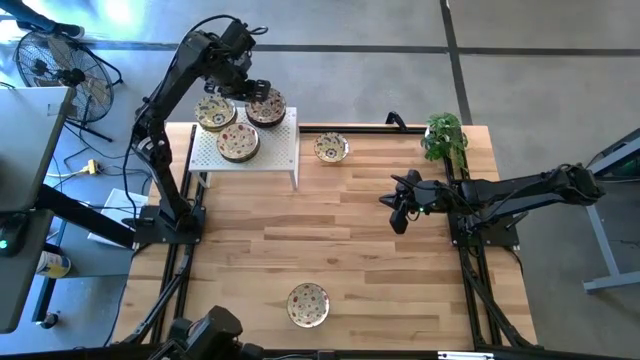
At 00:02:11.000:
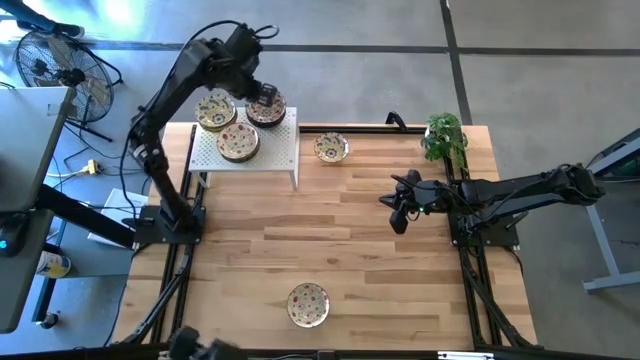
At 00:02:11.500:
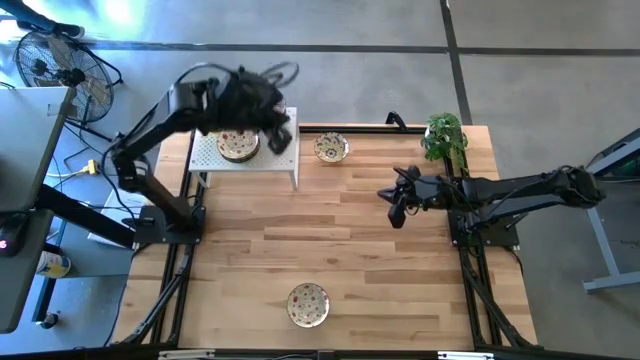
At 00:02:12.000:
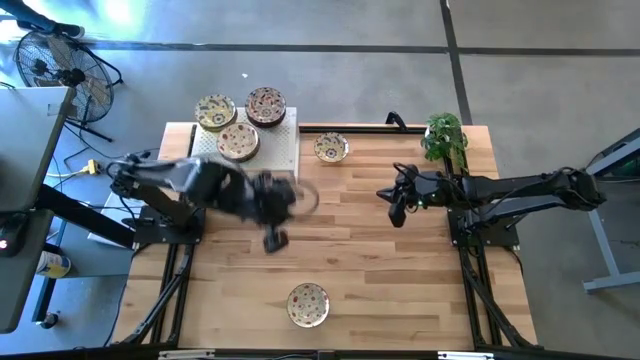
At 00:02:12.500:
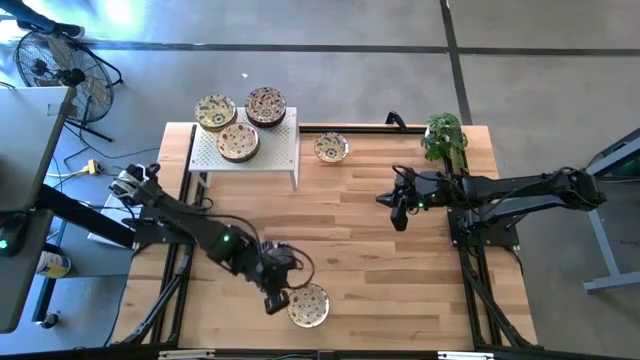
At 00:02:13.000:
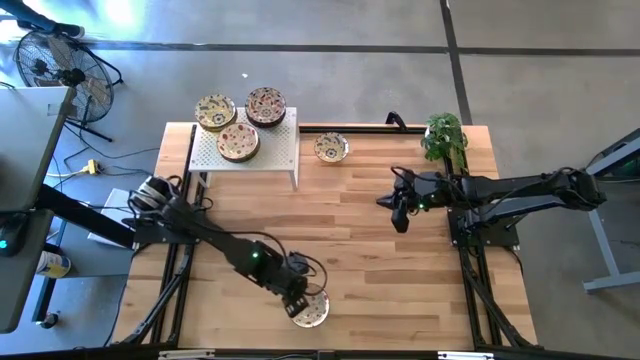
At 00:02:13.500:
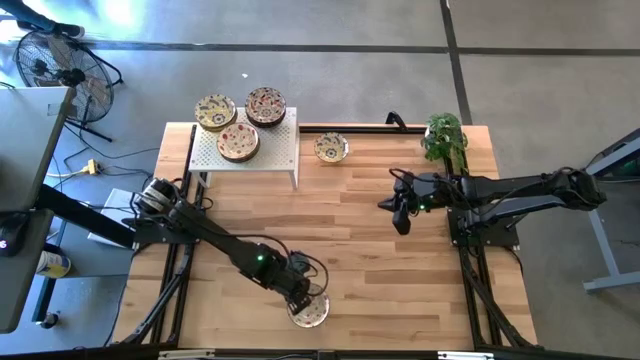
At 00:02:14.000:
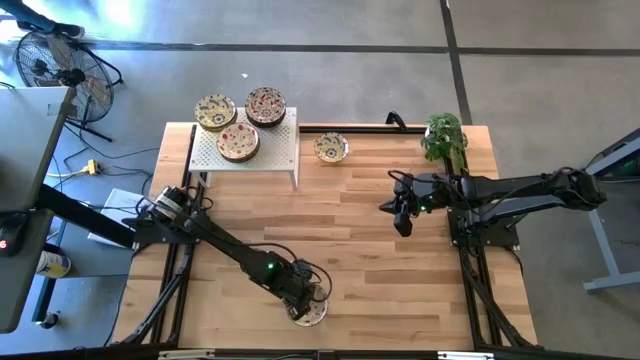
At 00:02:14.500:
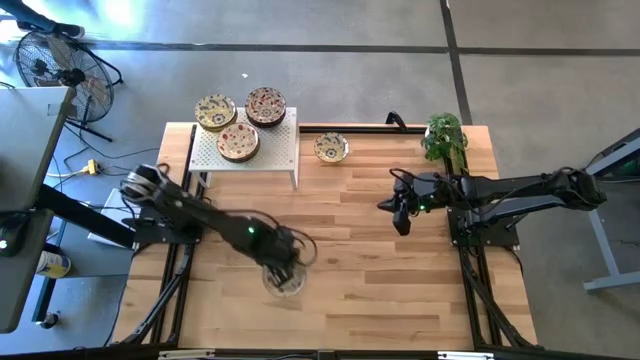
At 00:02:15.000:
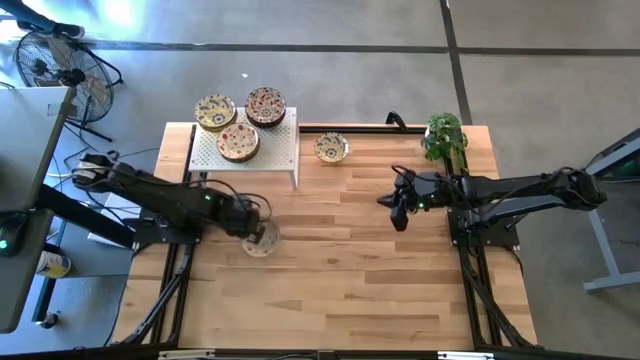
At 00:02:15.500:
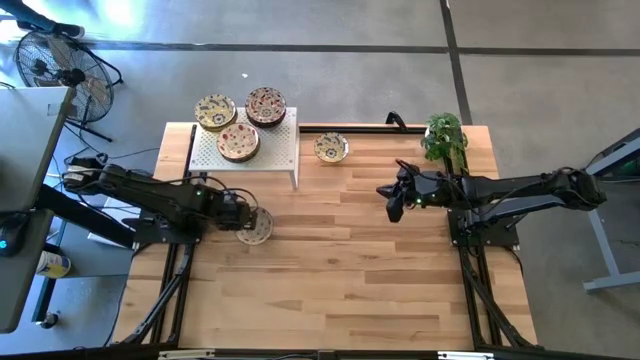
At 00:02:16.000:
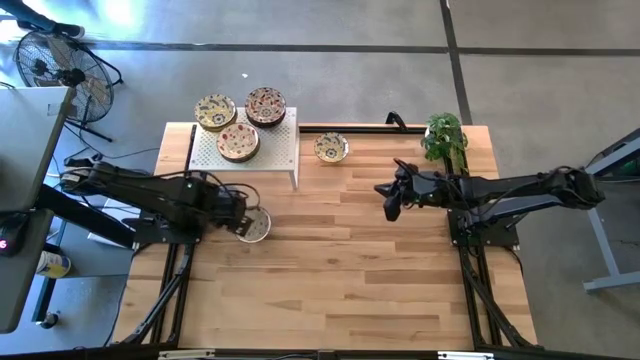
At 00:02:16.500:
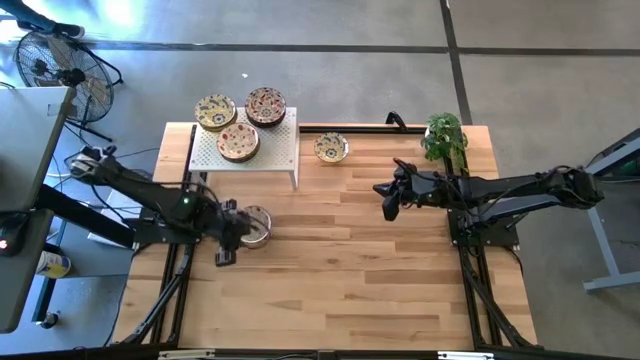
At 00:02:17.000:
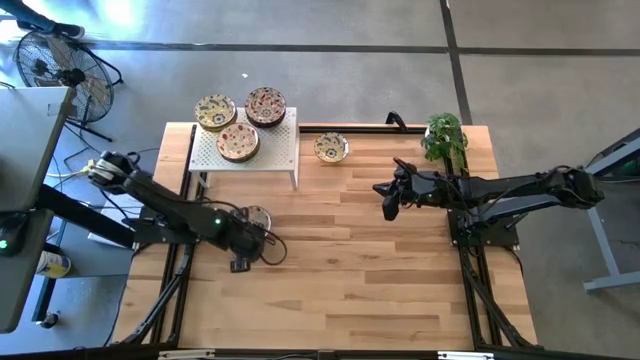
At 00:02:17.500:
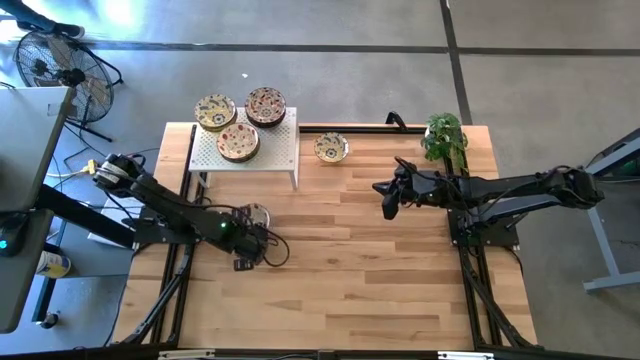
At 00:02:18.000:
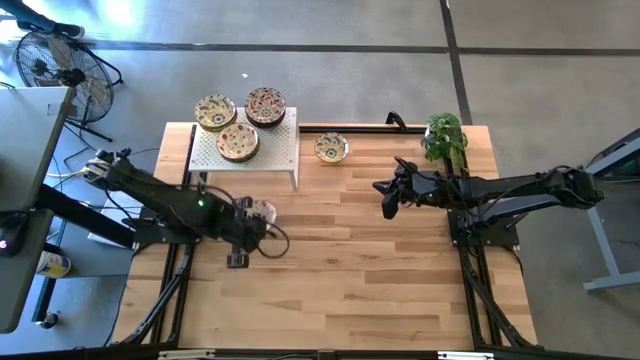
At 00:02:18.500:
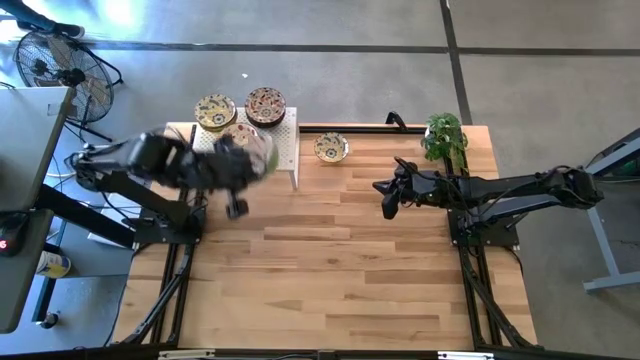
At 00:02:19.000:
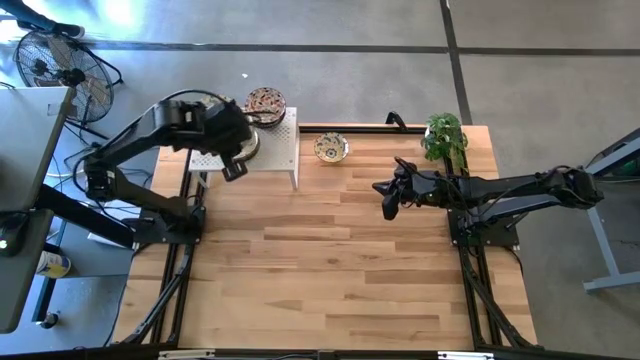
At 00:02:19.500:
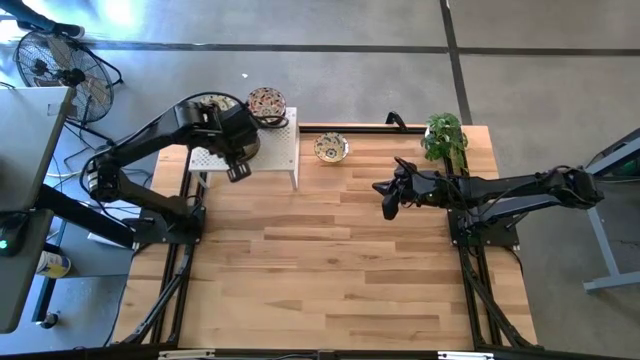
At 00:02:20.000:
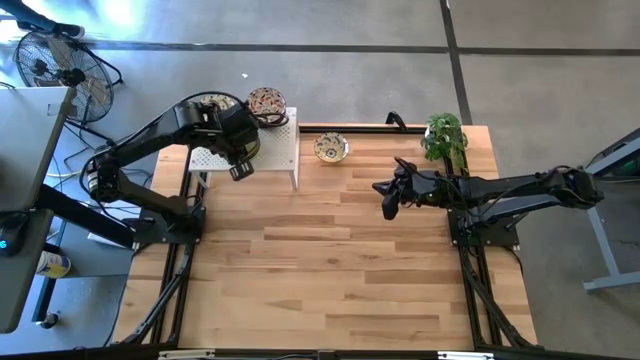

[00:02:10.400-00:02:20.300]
Task: Pick & Place Mini bowls
Stack the green patterned bowl on the stacked green patterned bowls on the shelf

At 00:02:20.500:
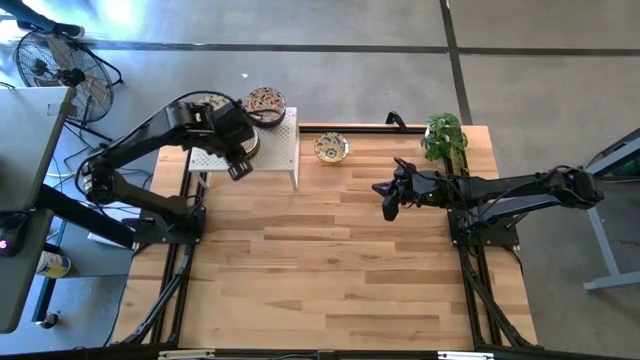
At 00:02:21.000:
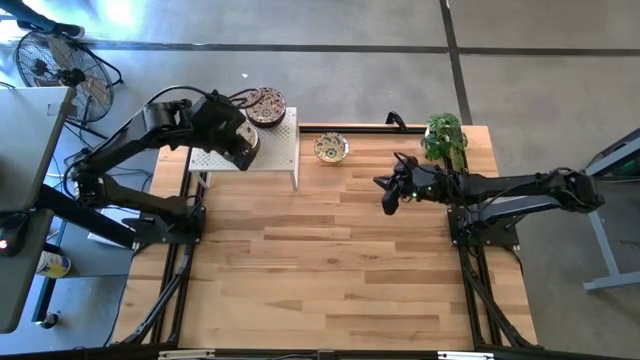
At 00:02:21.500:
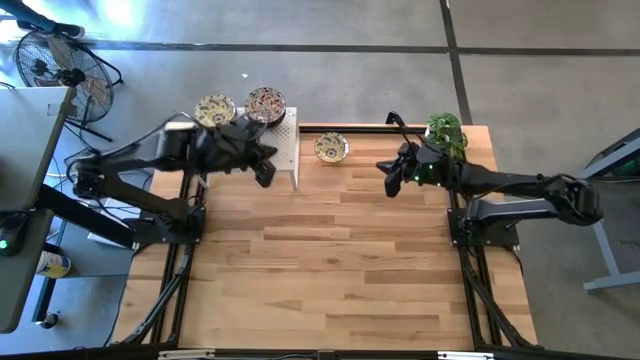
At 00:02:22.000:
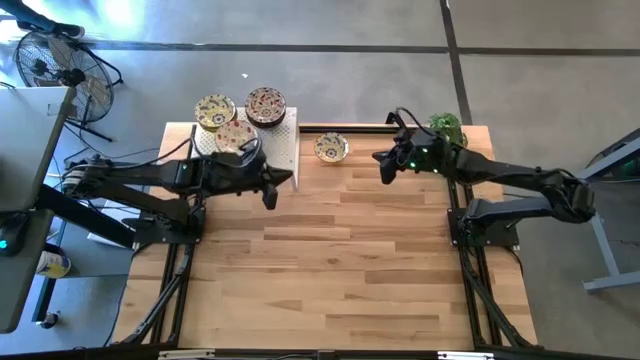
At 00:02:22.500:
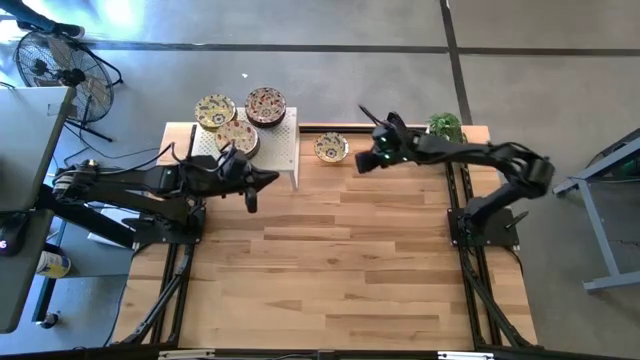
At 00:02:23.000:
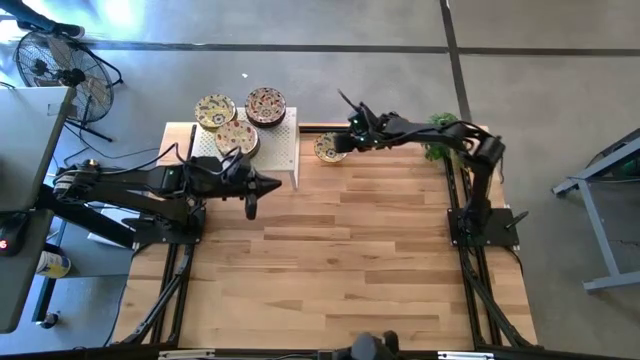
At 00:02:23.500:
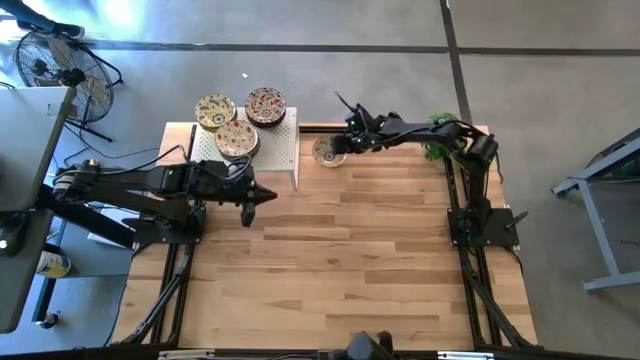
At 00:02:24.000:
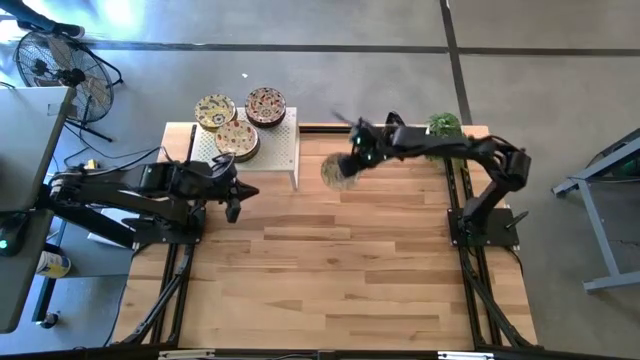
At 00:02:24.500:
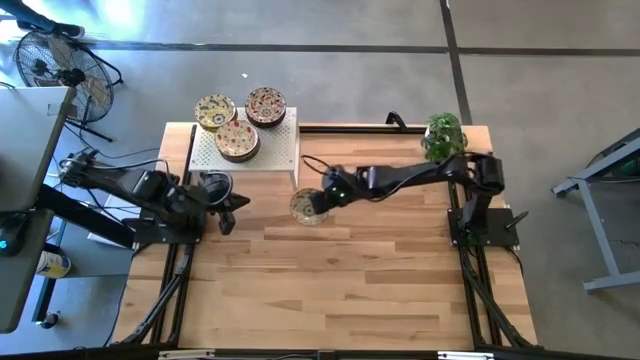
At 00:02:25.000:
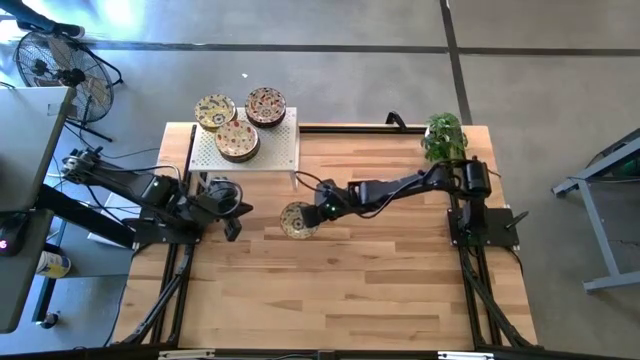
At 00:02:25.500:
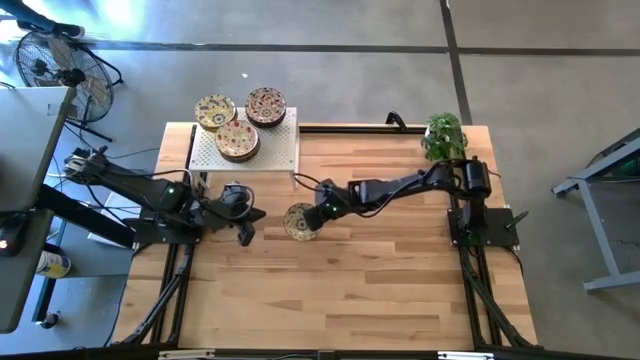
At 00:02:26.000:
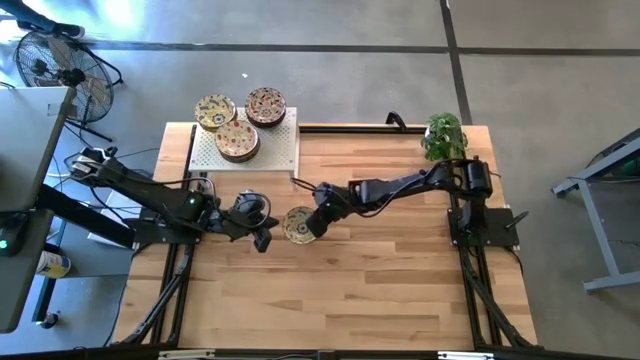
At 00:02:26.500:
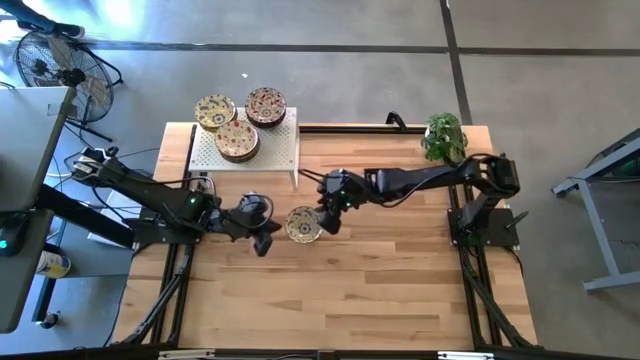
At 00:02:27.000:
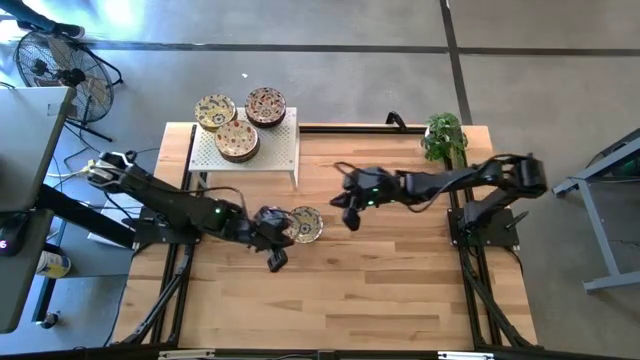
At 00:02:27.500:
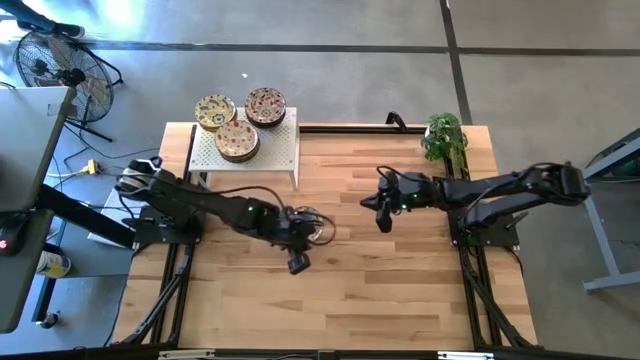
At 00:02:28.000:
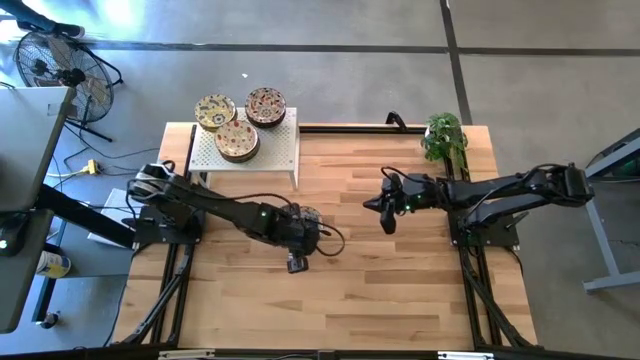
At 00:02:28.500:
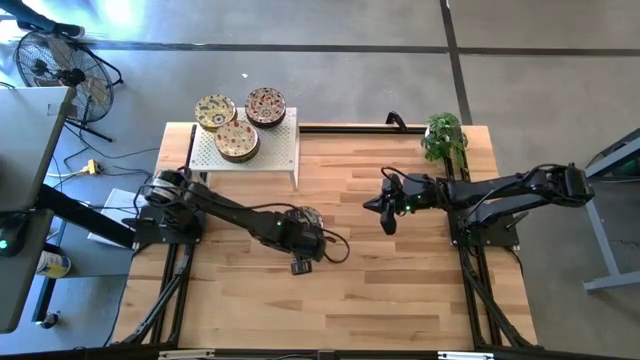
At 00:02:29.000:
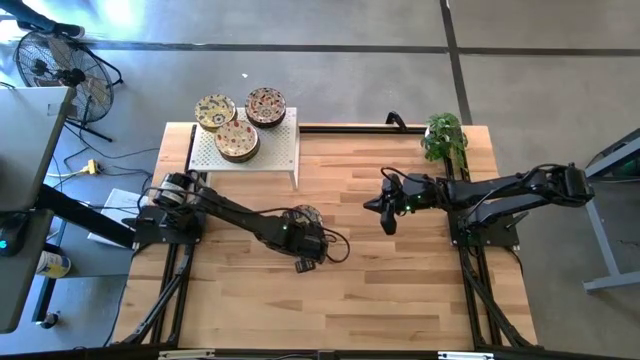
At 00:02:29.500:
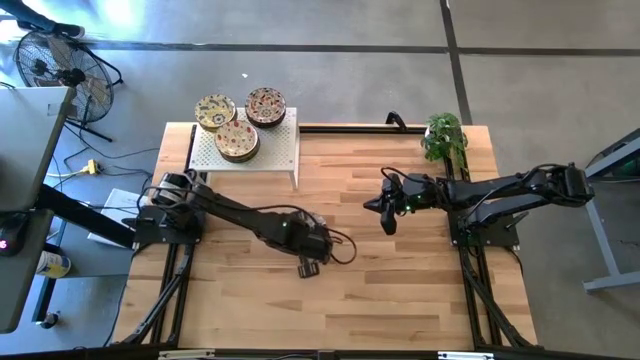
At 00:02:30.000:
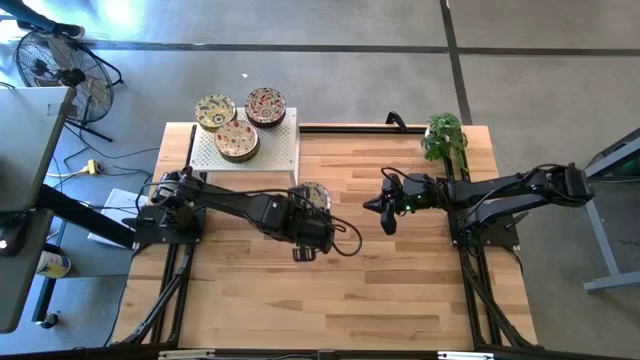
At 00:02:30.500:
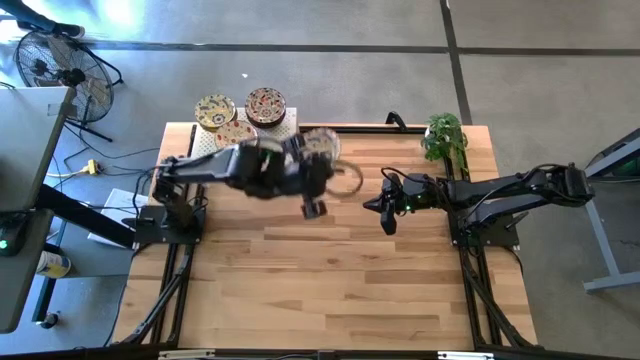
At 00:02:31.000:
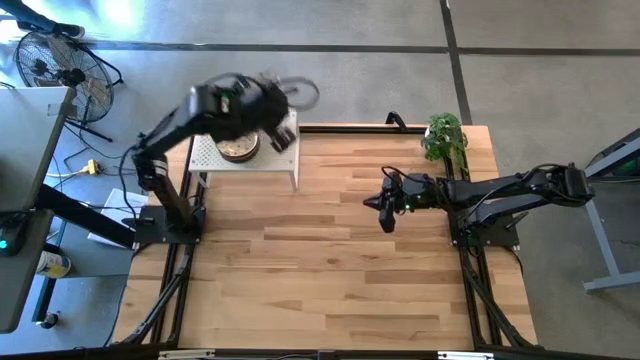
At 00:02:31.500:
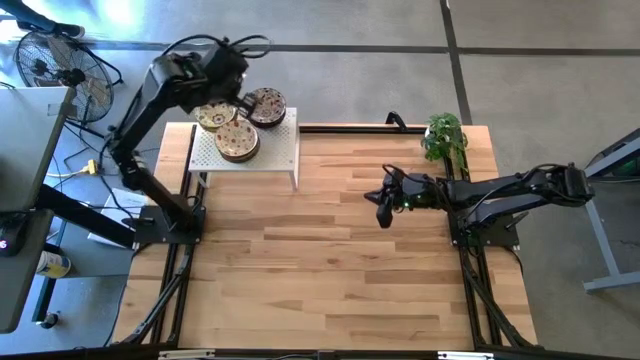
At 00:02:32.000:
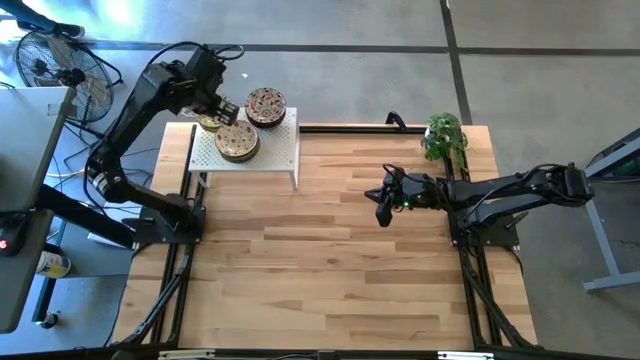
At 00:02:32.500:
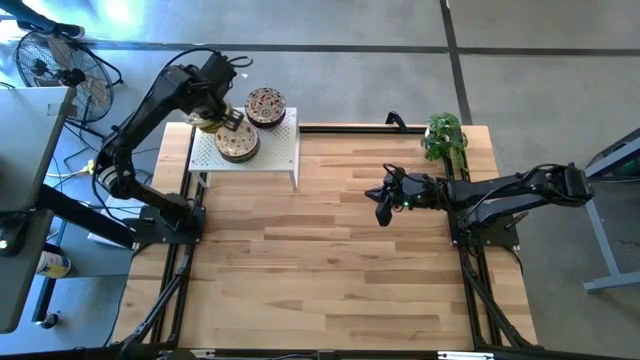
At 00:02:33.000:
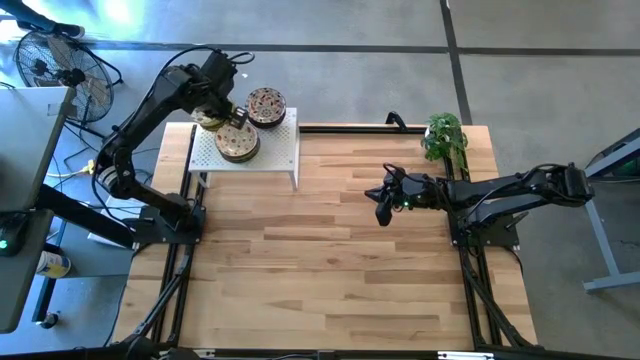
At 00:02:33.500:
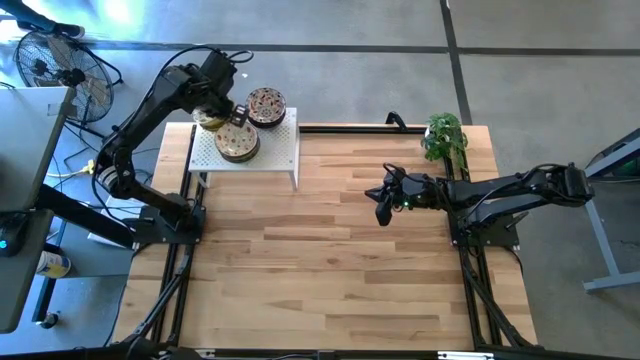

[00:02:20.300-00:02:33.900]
Stack the yellow patterned bowl on the stacked yellow patterned bowls on the shelf
